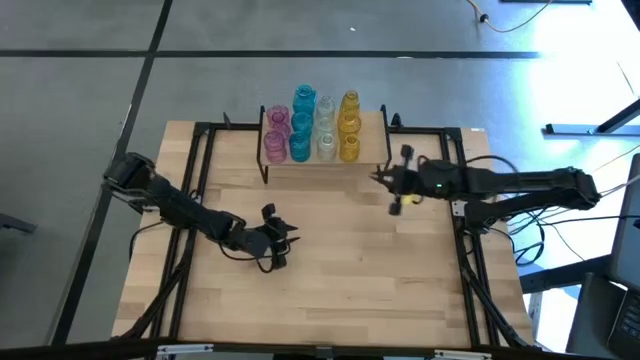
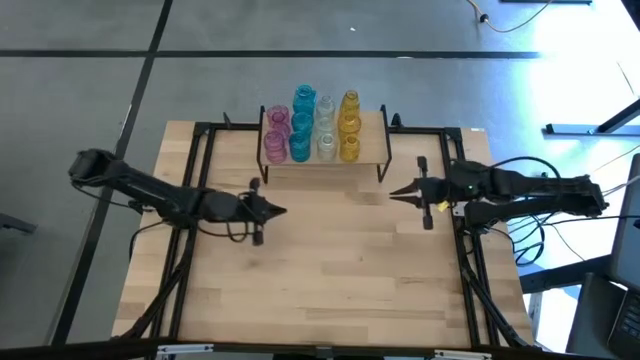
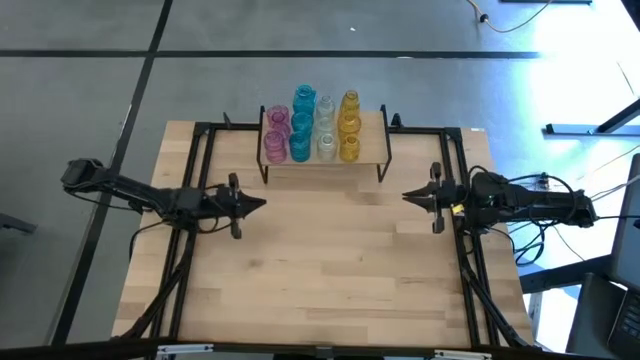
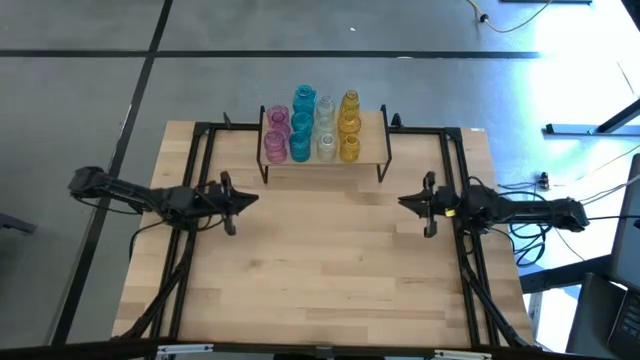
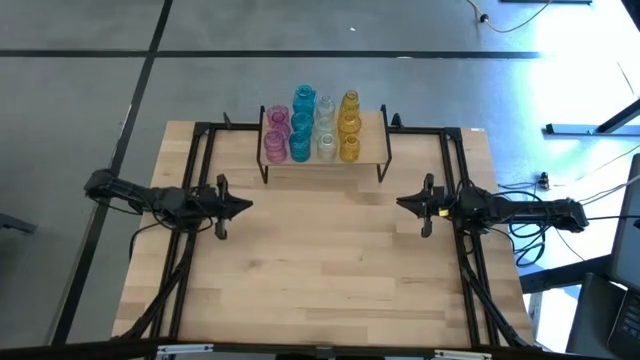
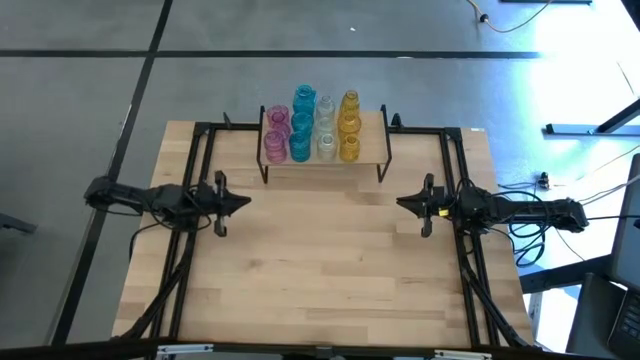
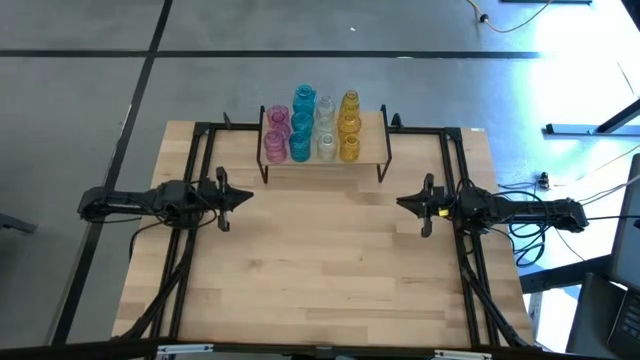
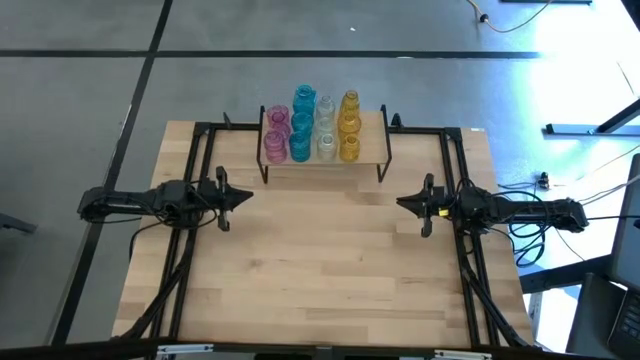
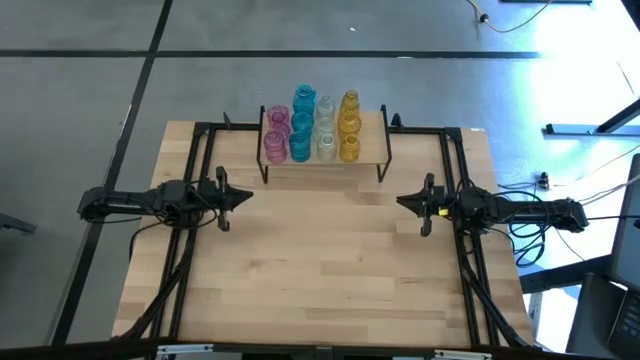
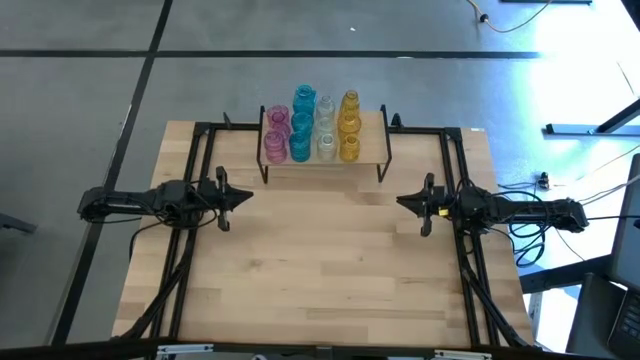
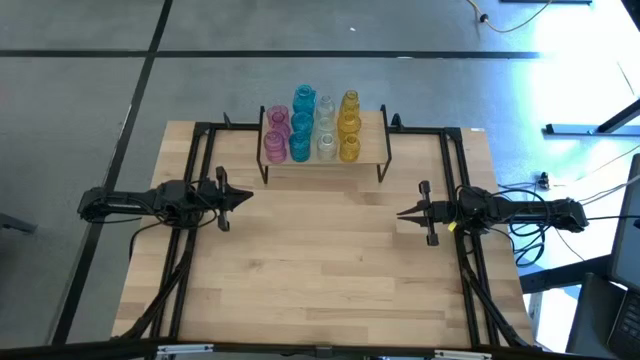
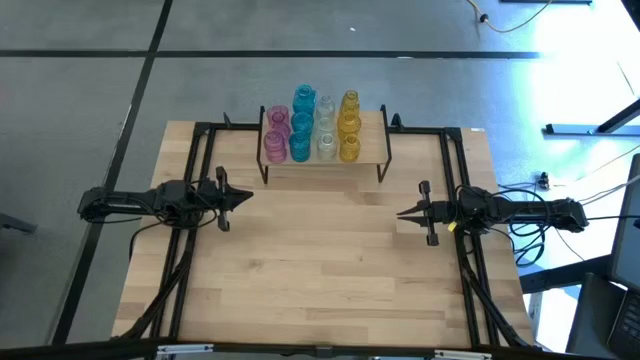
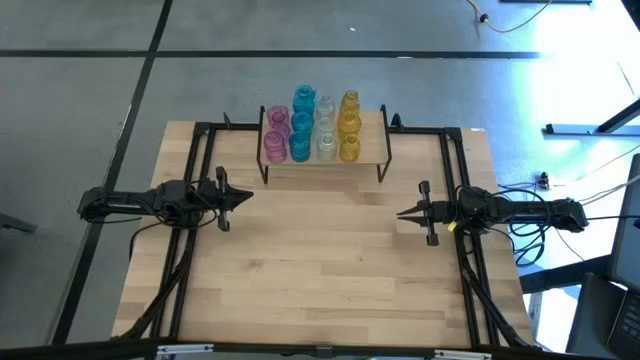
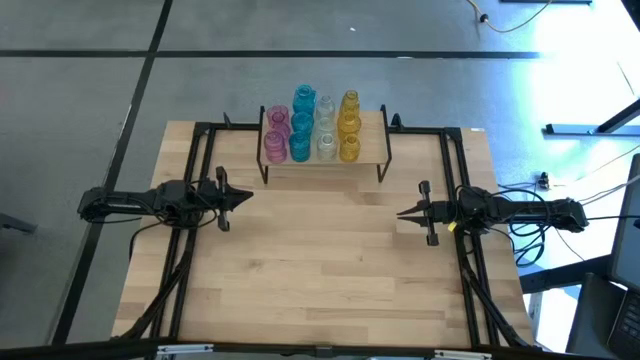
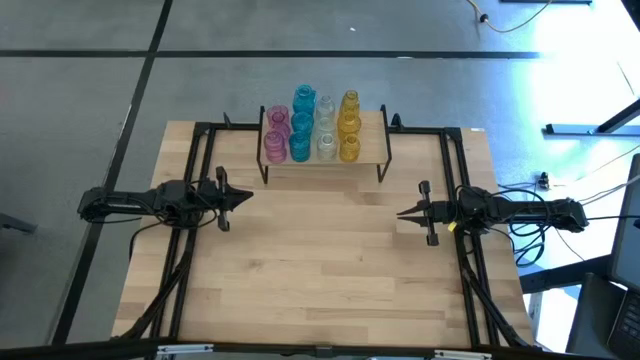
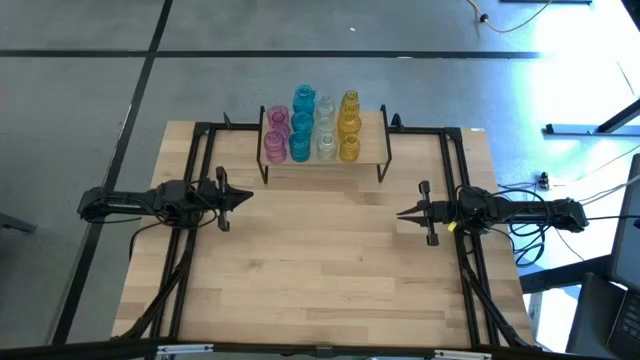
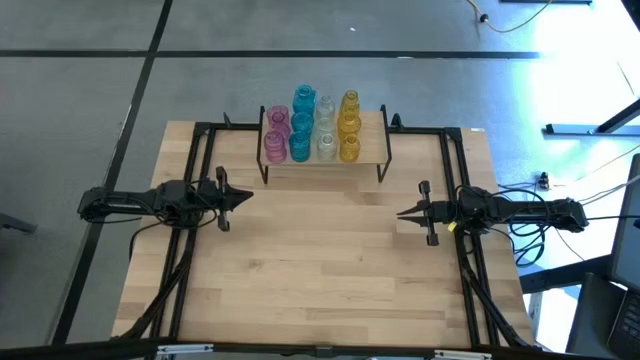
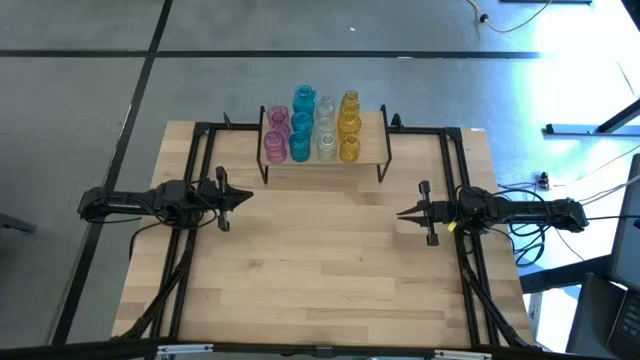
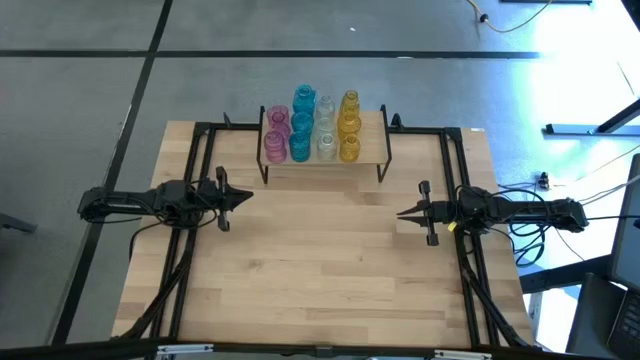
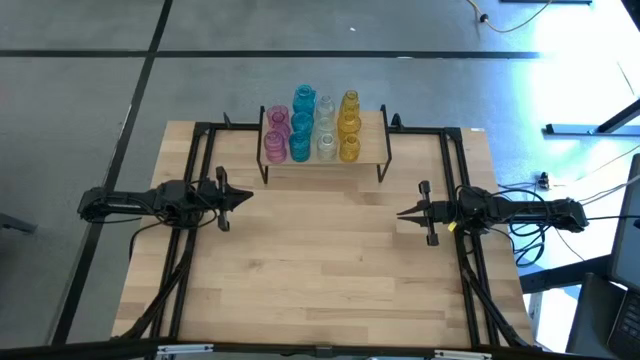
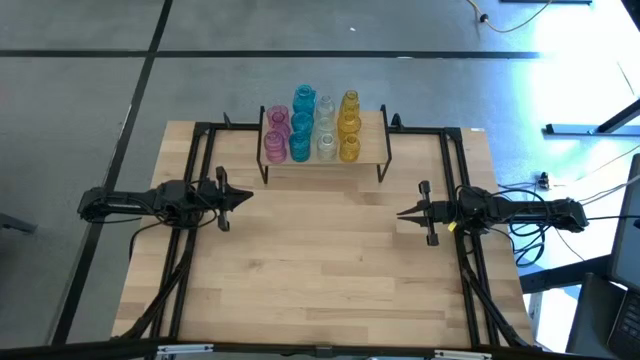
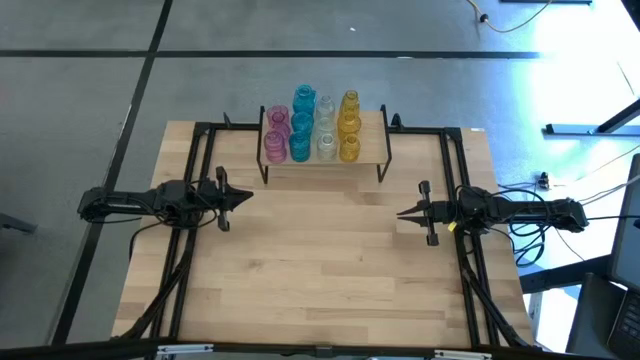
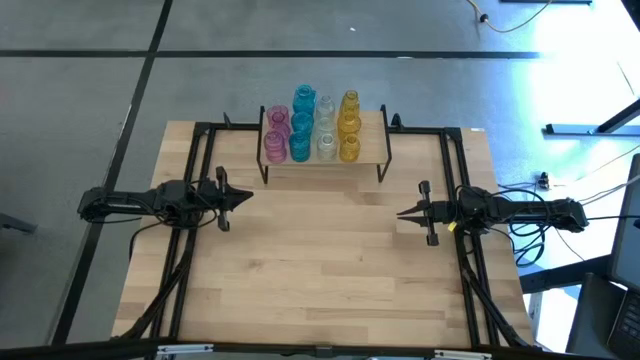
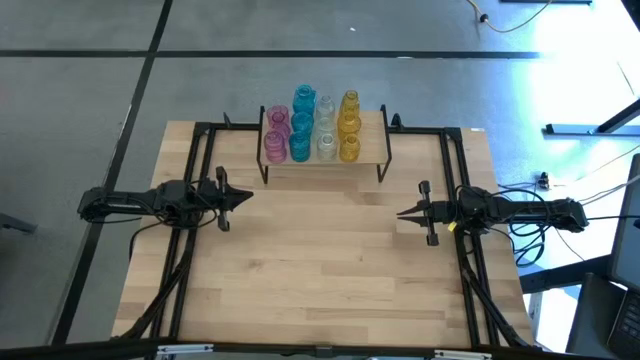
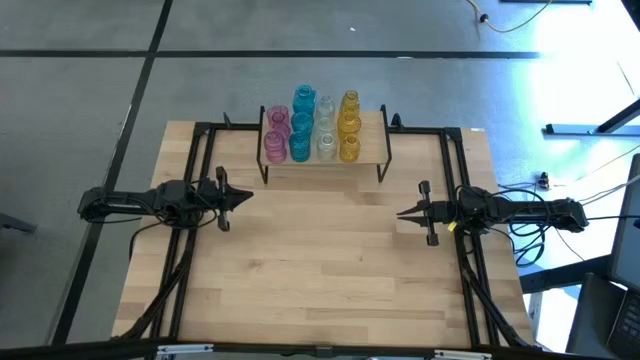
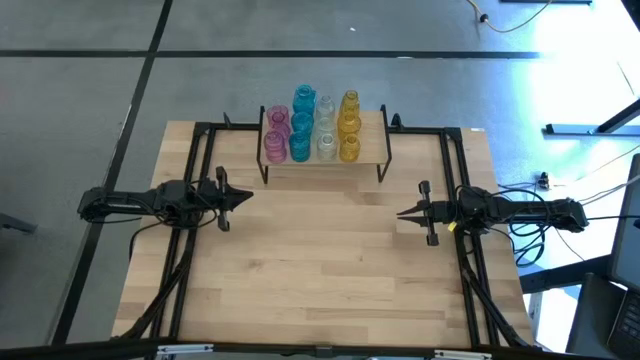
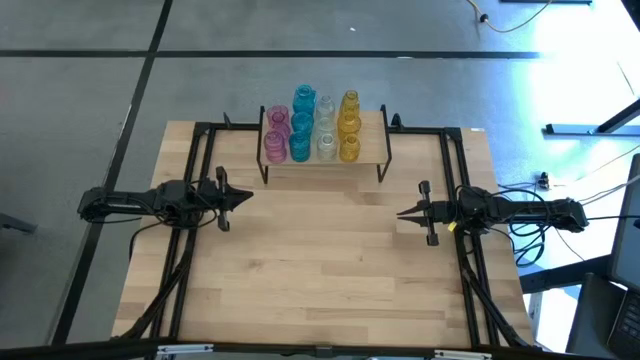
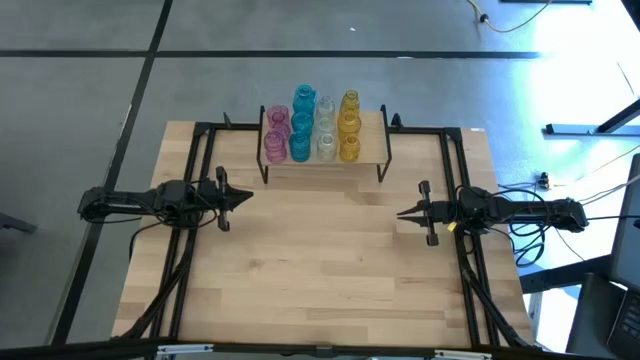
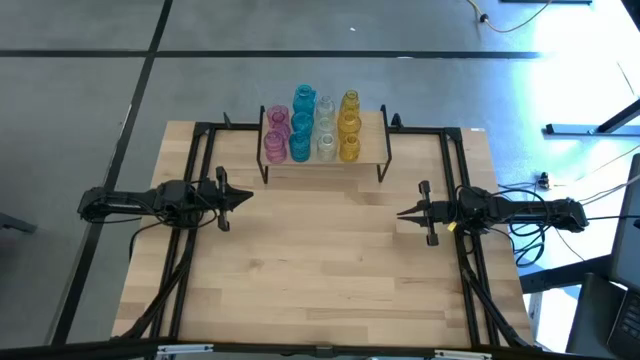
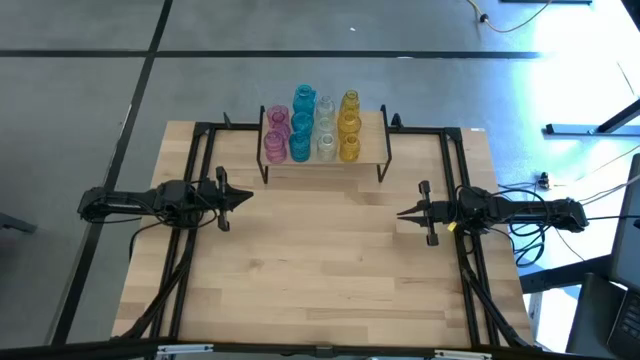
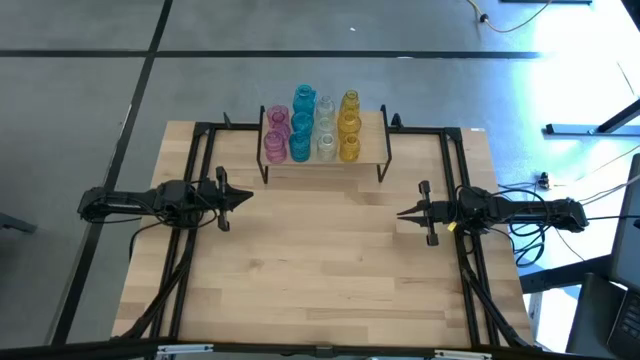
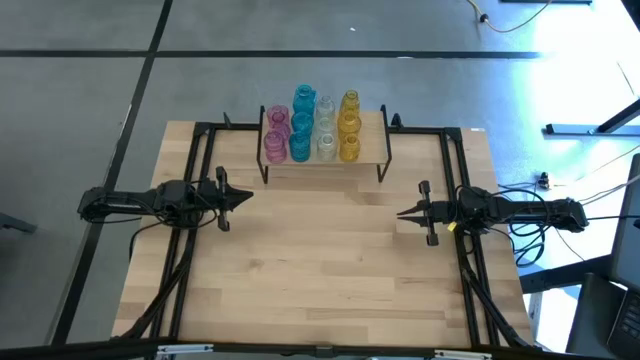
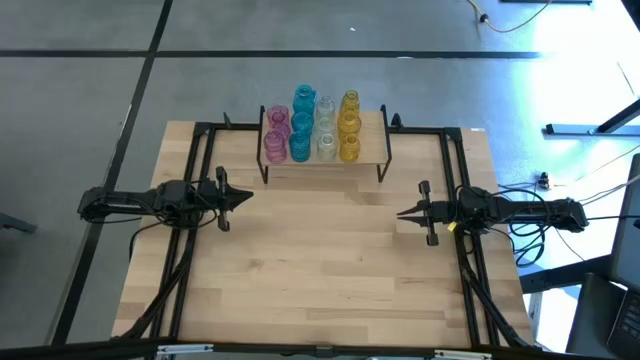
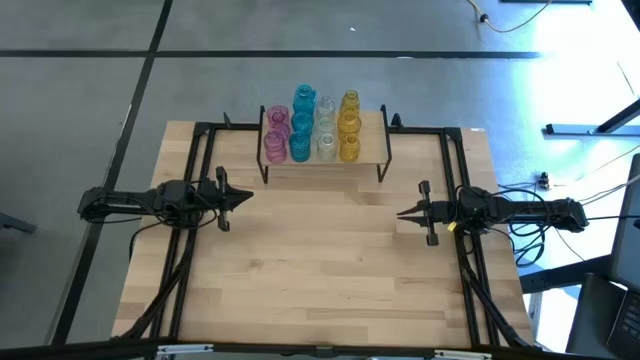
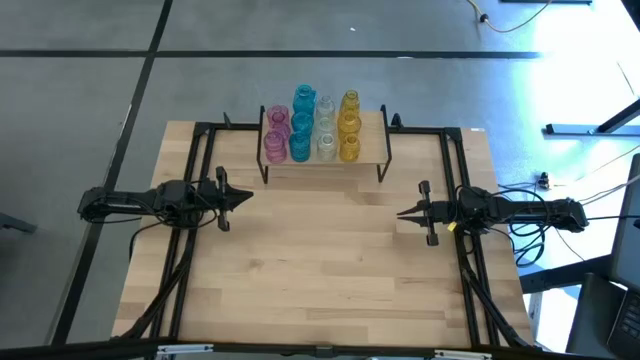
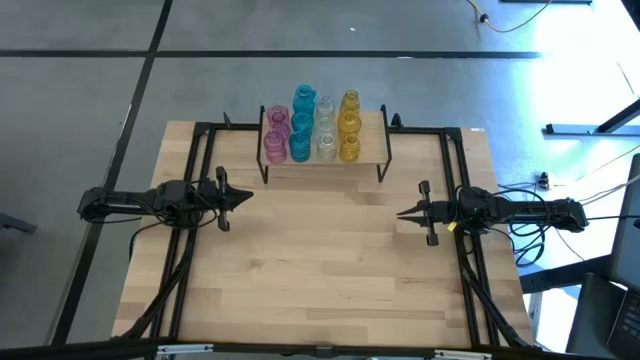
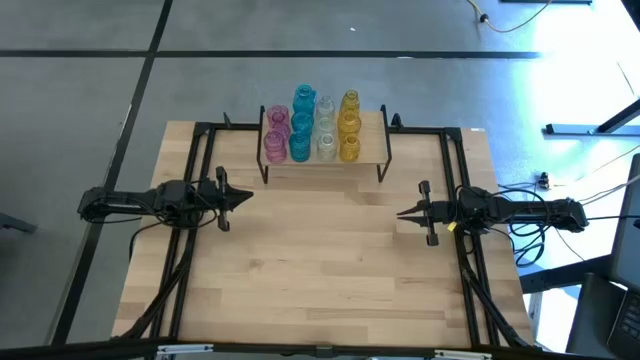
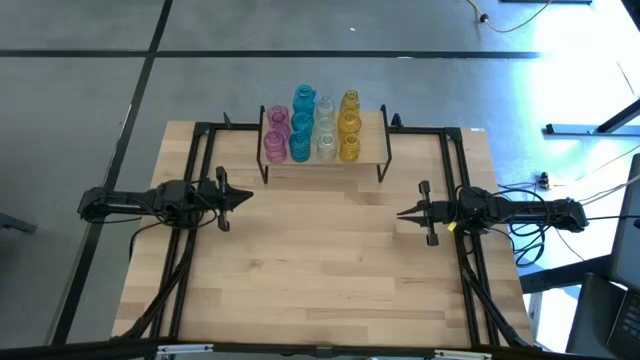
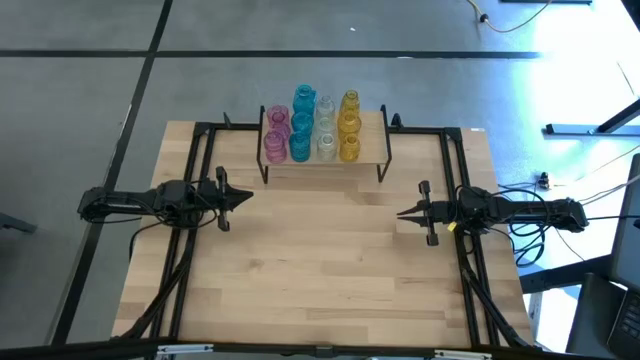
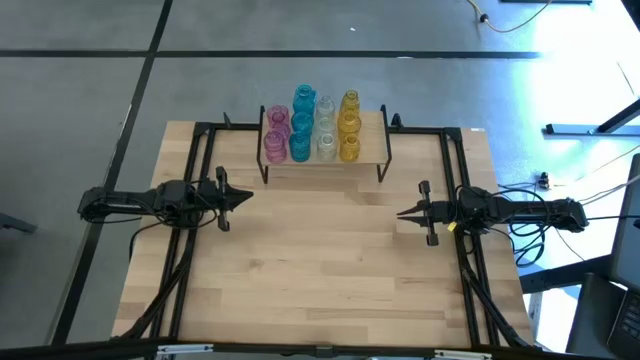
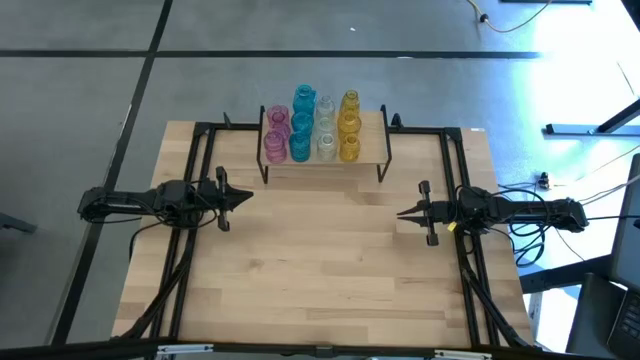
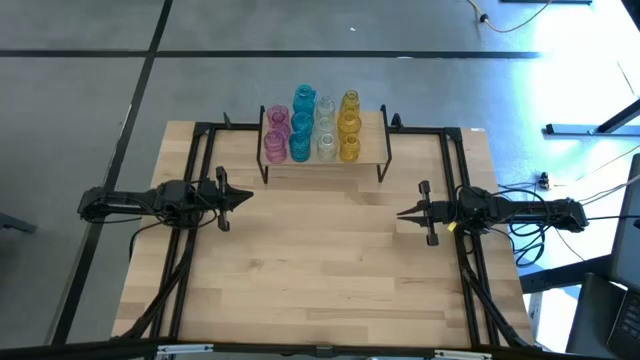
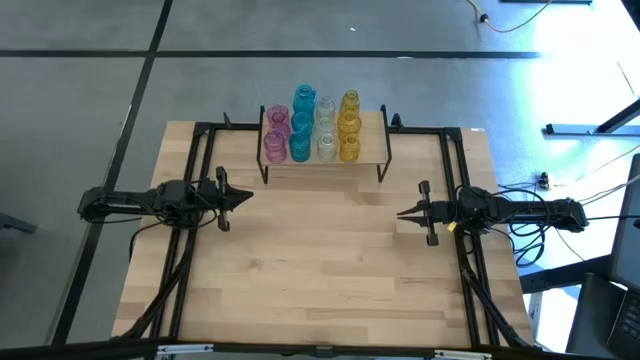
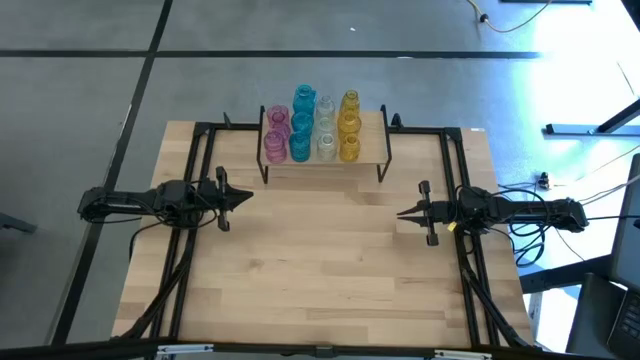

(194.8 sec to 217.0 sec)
Task: sort vases onto shelf
Return to Home Position
